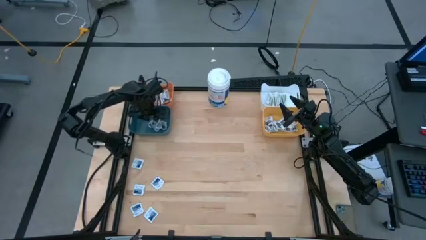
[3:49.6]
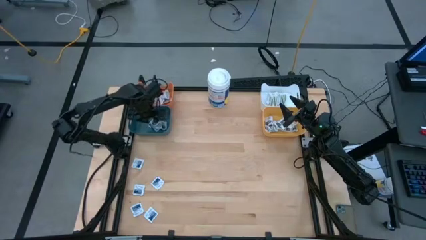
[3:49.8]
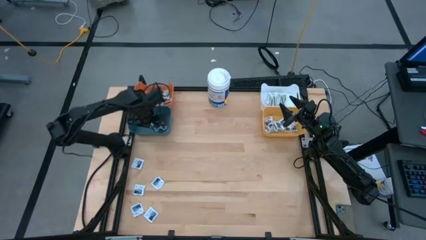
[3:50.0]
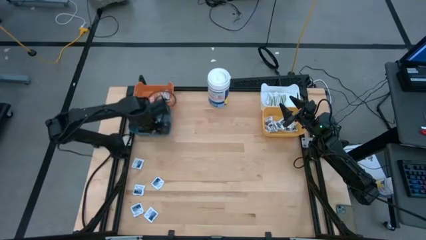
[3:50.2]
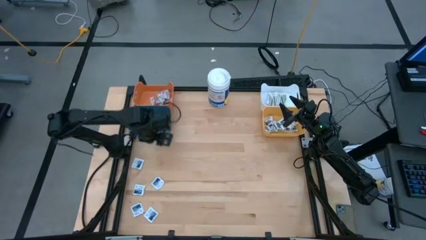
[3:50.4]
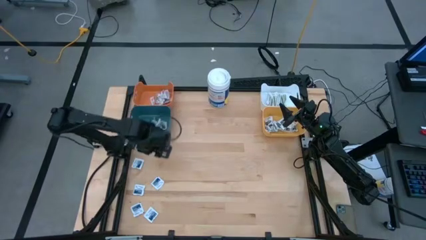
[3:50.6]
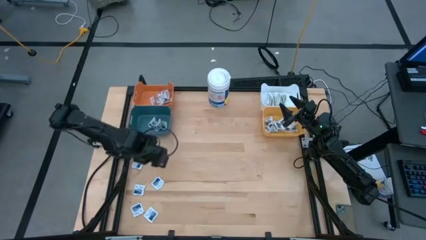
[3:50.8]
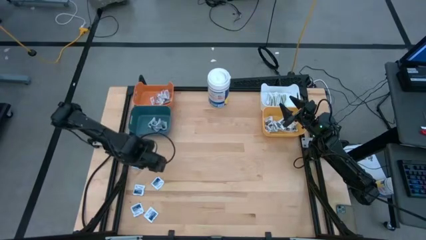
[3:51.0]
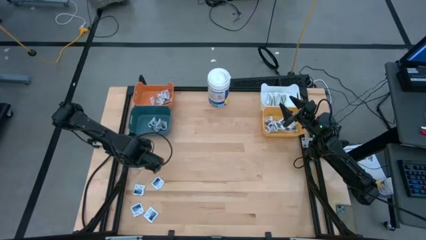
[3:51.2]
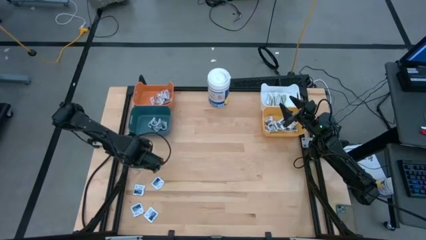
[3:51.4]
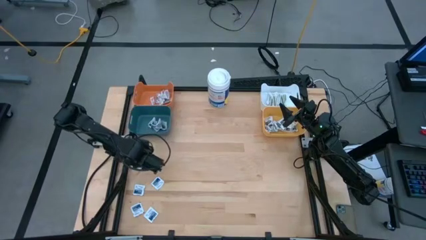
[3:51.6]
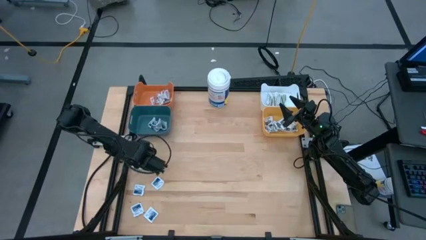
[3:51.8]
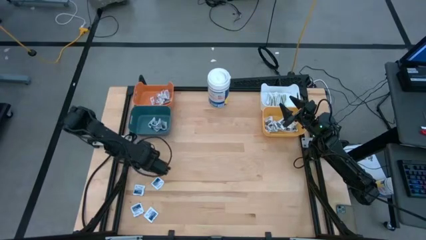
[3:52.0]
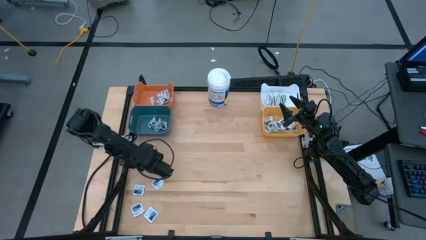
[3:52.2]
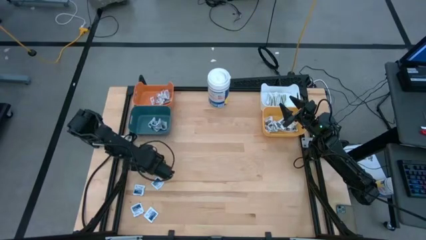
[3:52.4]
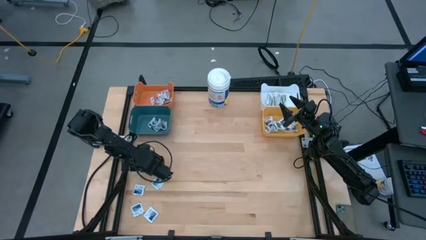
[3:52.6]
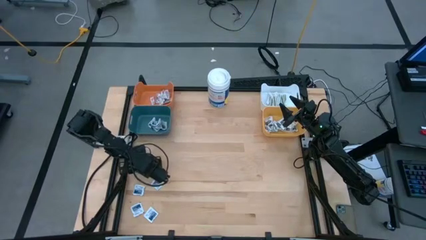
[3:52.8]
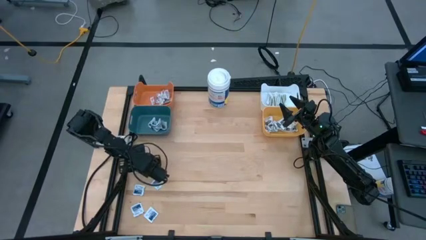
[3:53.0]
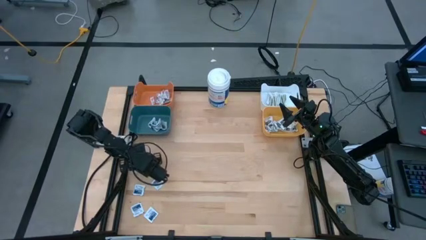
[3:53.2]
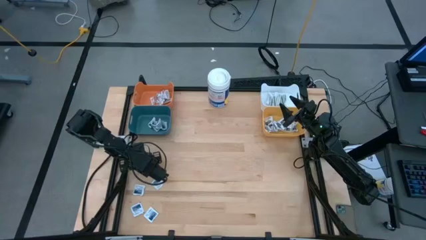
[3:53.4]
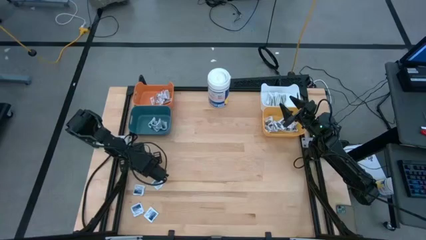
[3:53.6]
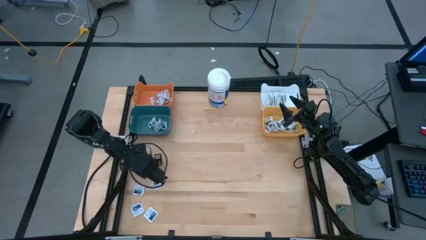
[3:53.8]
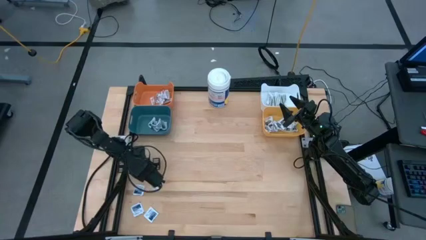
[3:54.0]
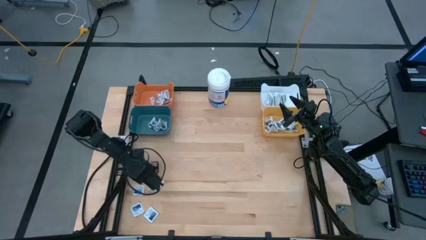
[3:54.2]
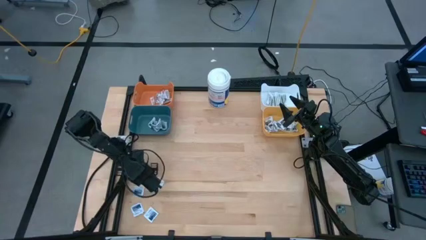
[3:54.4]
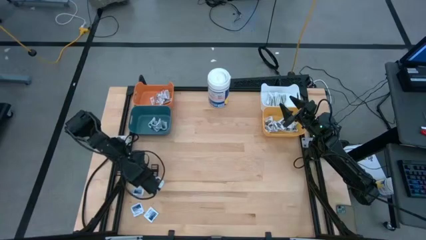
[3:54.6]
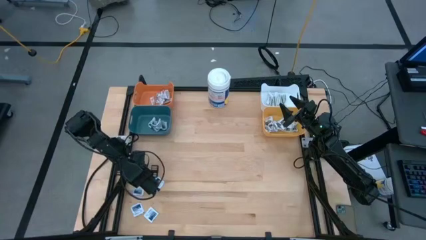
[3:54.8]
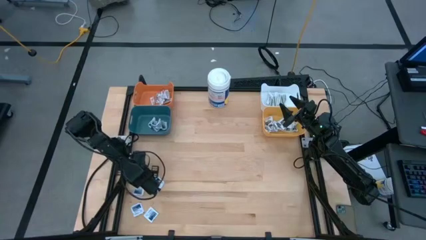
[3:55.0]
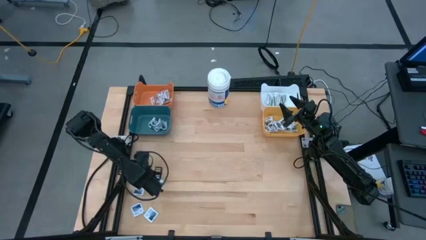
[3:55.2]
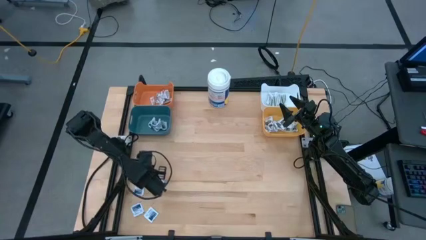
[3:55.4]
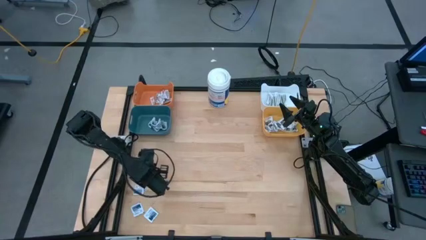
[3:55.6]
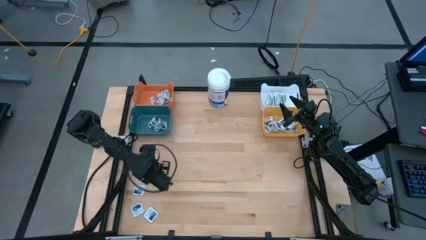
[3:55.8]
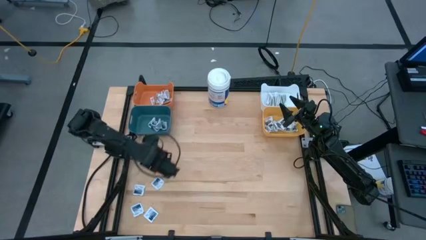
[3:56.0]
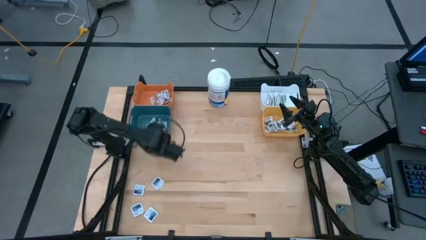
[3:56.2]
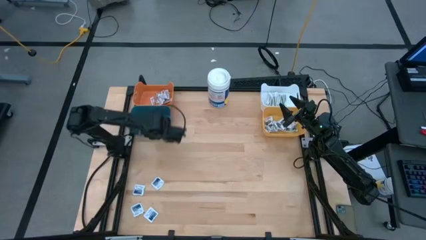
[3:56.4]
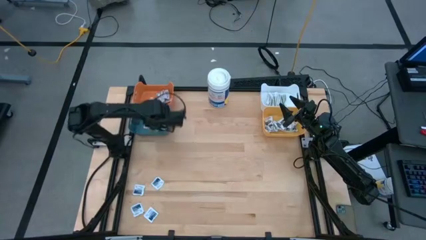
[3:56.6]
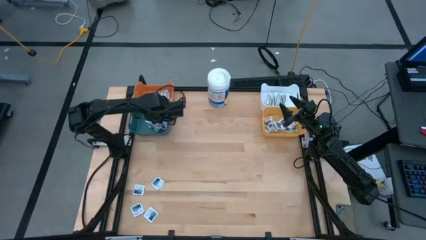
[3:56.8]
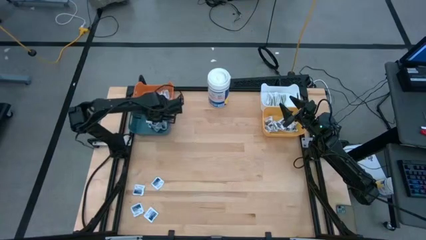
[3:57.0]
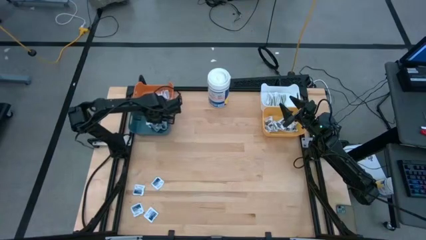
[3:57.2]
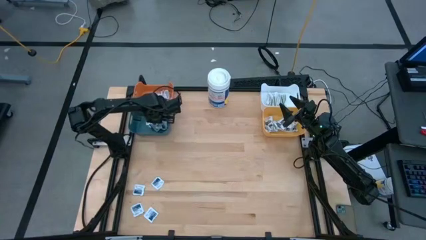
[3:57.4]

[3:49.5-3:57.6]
Task: Pick & Place First Aid Supplies
Put the blue pad into the blue bin

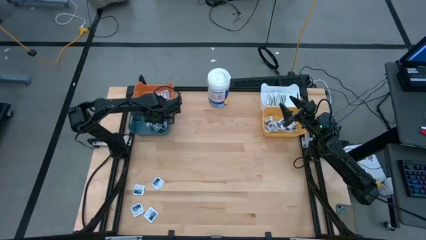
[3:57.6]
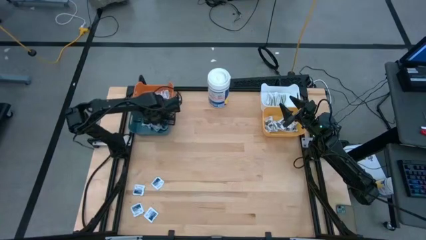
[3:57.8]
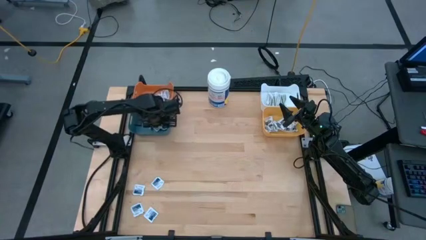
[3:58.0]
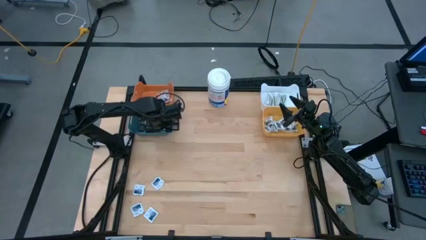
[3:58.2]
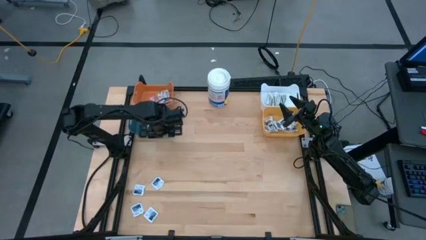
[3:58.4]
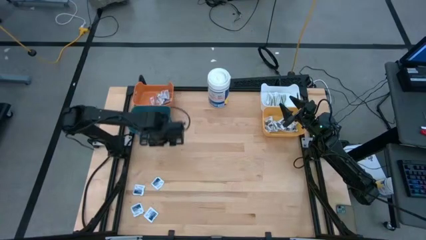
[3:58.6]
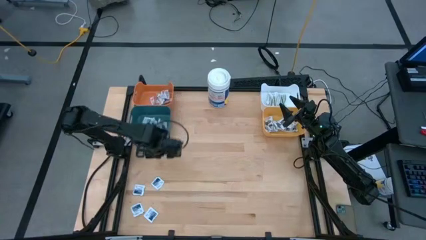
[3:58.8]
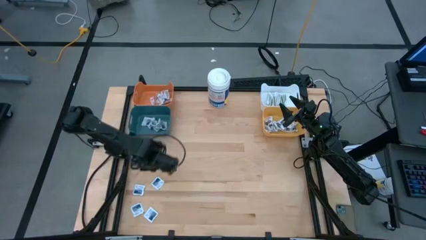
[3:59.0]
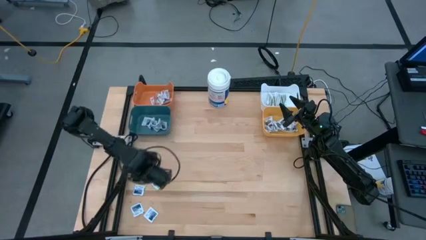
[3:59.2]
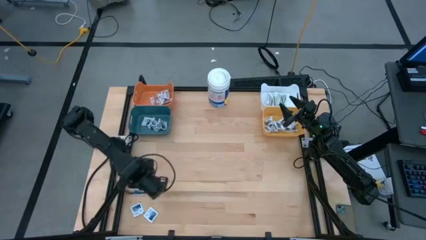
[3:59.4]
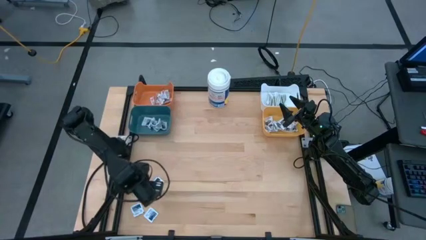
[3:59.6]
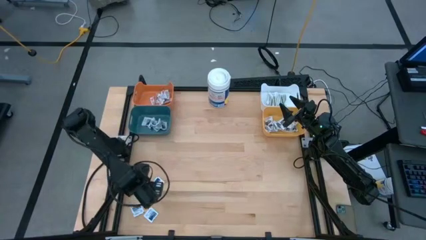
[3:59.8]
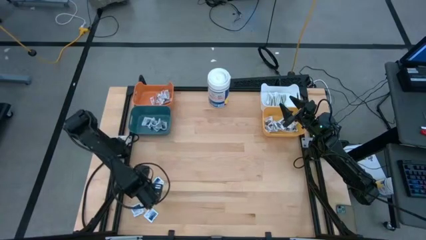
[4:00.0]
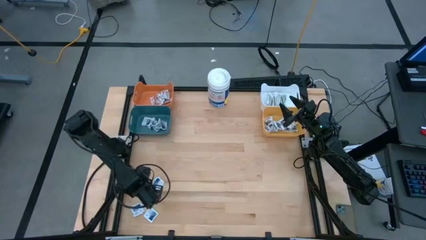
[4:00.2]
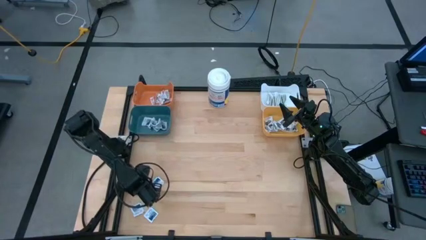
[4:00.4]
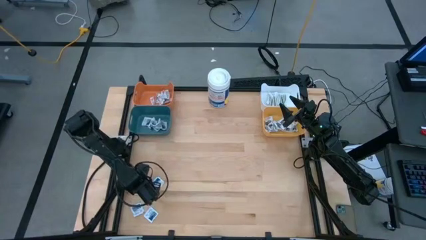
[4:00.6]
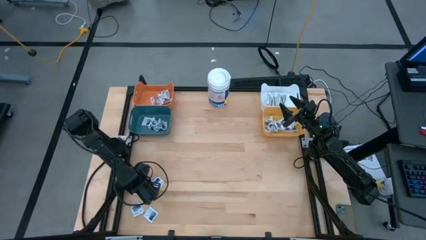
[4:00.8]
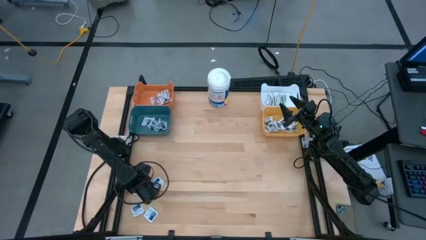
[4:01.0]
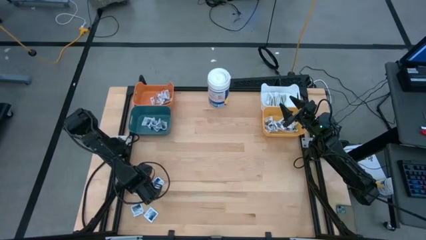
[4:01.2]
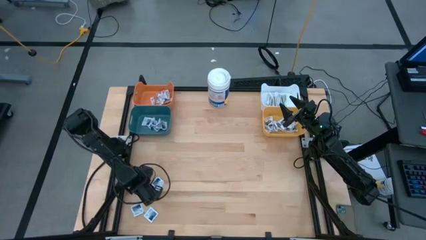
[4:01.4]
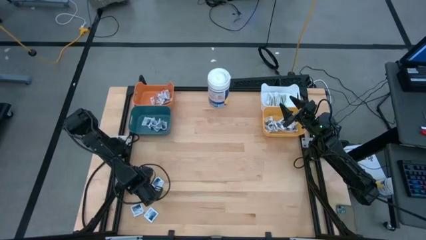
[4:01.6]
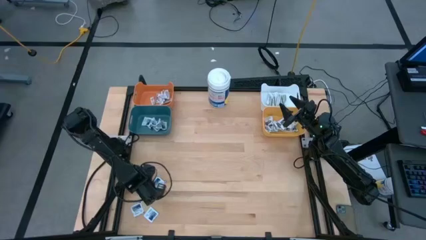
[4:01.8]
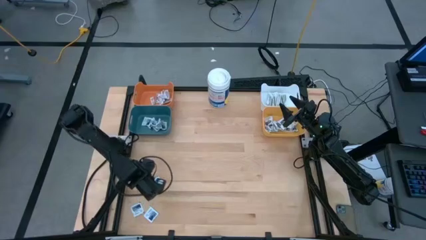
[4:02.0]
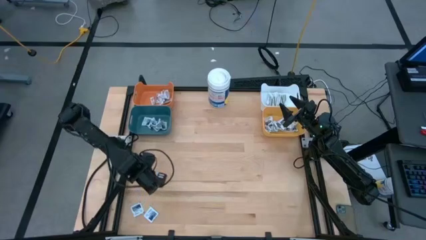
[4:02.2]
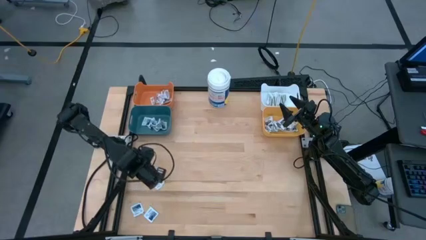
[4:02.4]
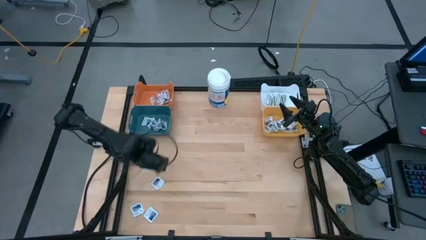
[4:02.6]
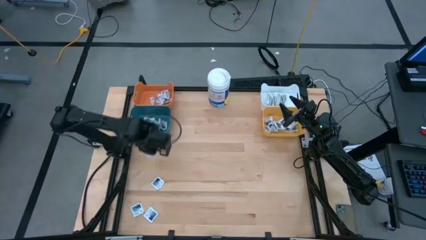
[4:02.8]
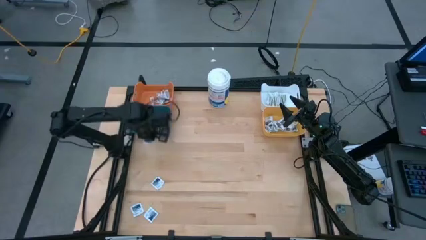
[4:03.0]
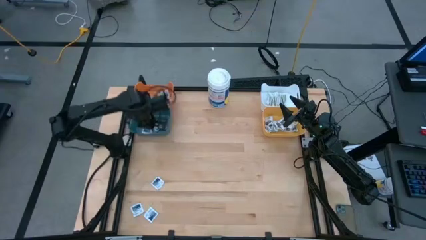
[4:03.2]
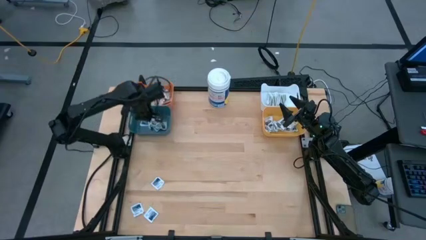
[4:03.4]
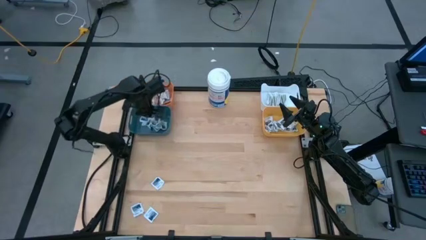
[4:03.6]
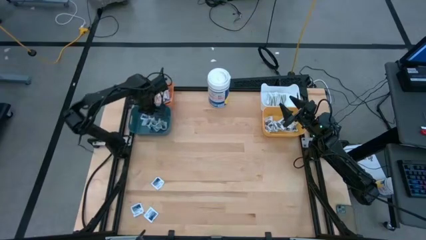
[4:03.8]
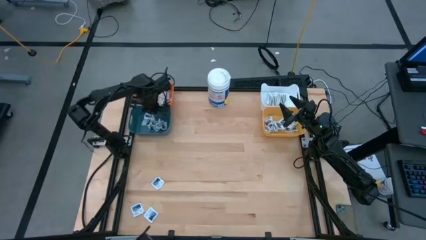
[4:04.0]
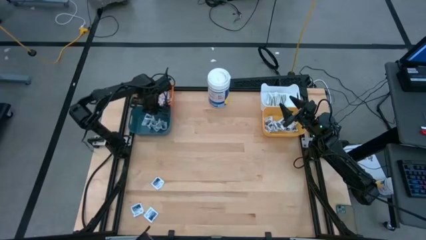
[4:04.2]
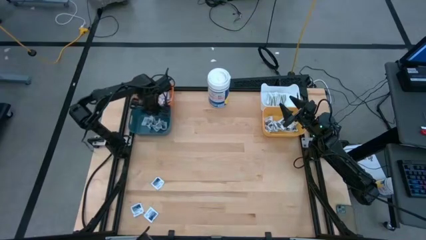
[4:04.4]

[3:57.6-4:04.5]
Put the blue pad into the blue bin

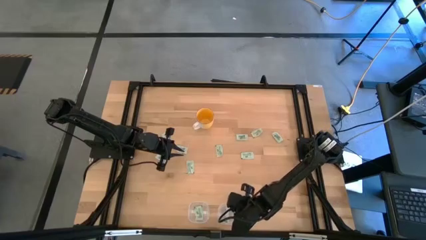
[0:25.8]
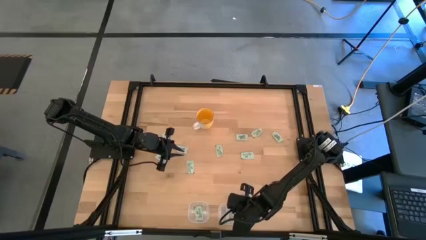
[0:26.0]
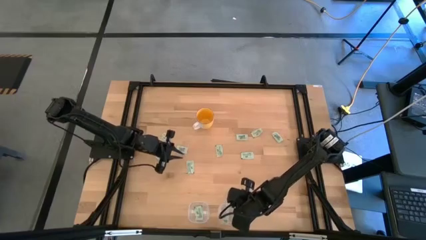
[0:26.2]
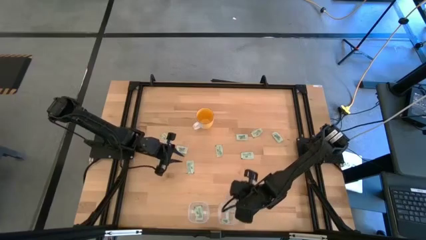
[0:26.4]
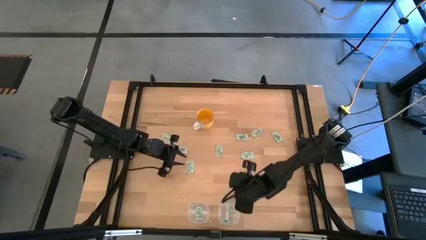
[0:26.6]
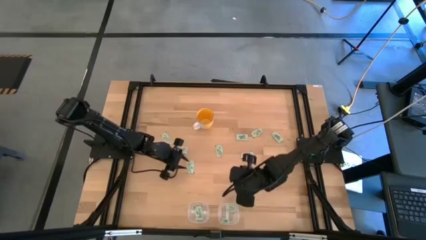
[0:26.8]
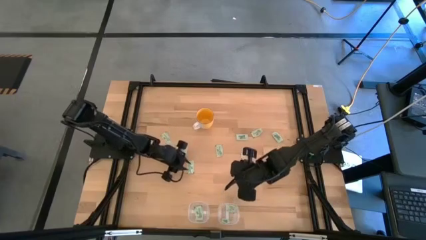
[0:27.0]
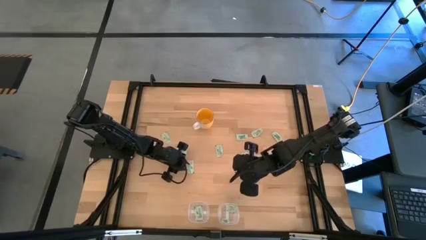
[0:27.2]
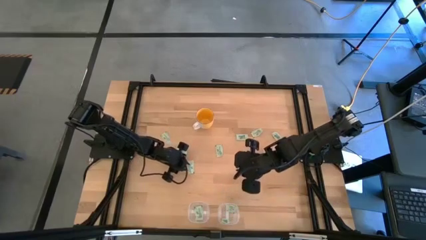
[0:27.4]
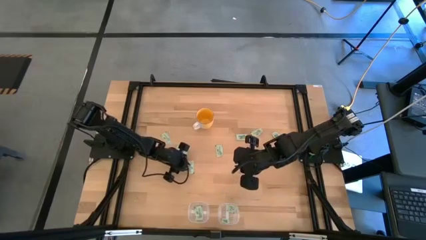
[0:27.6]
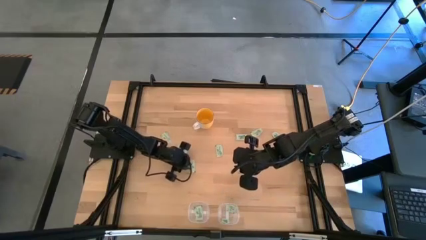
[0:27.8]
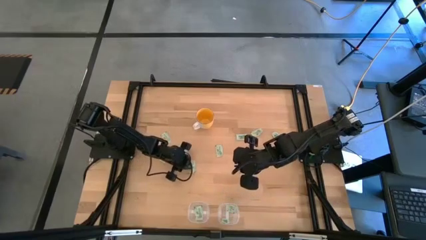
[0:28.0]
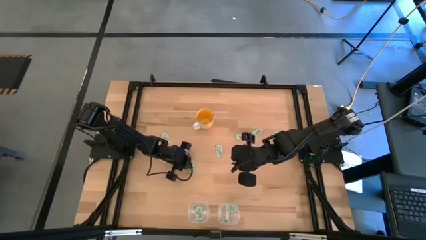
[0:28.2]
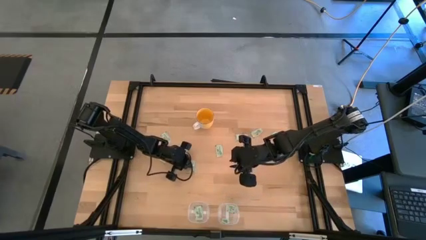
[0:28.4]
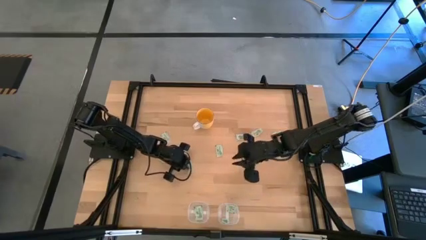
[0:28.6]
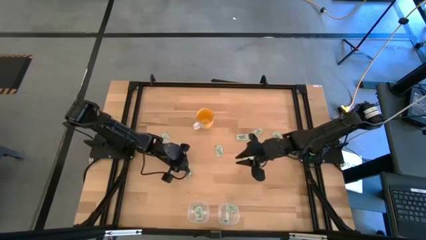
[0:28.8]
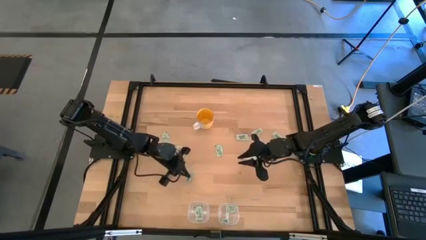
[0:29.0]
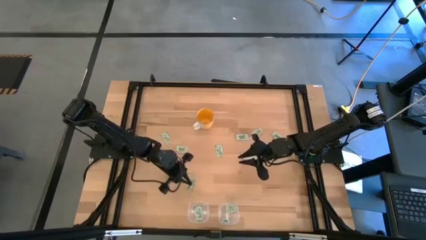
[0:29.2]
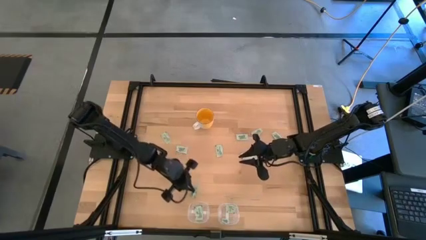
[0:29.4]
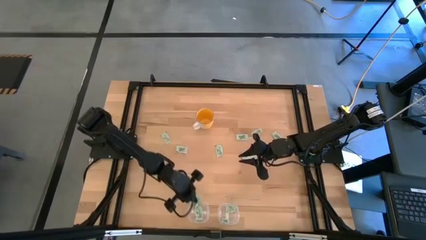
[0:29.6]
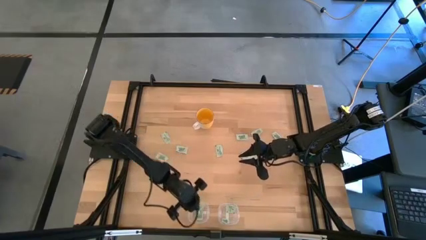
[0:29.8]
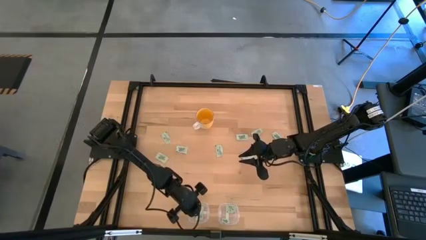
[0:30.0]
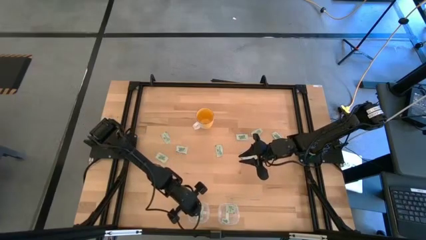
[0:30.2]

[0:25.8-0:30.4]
Task: Pick and place items into bin
Put the green stevia packet into the left transparent bin
